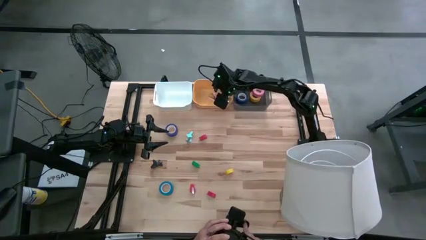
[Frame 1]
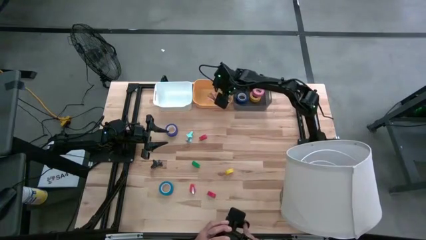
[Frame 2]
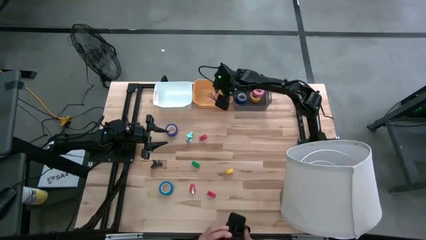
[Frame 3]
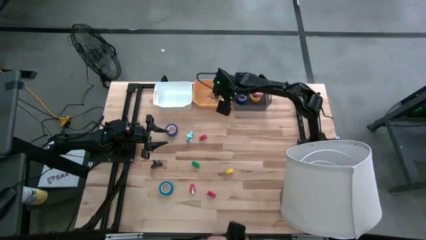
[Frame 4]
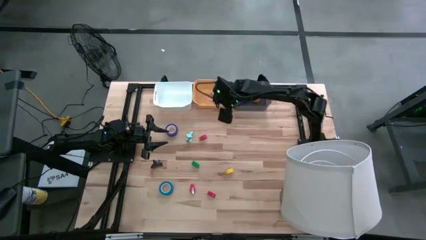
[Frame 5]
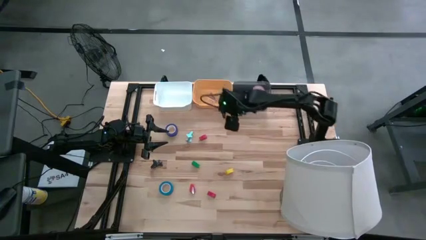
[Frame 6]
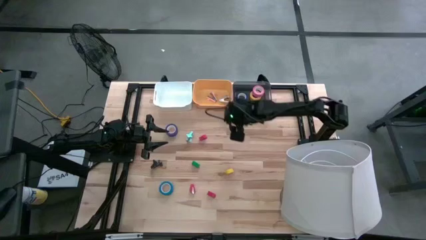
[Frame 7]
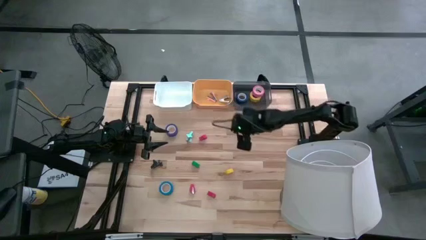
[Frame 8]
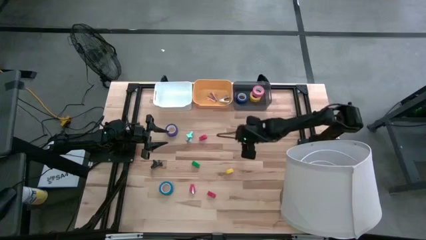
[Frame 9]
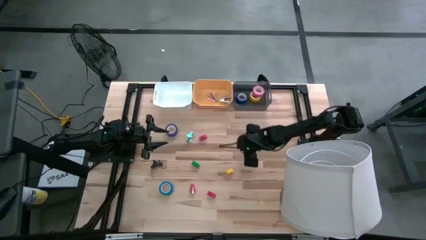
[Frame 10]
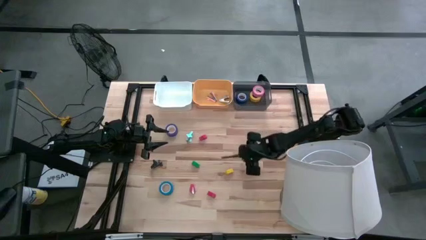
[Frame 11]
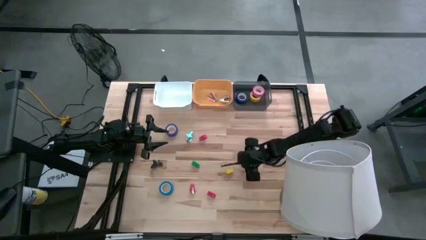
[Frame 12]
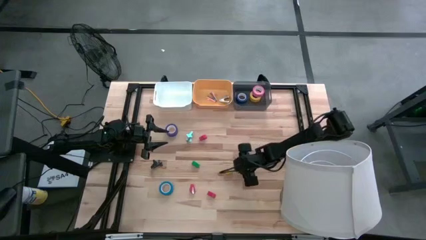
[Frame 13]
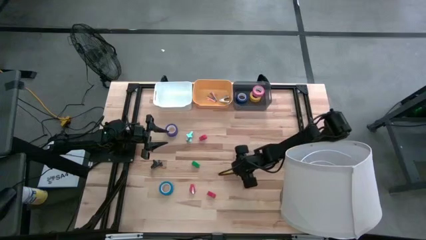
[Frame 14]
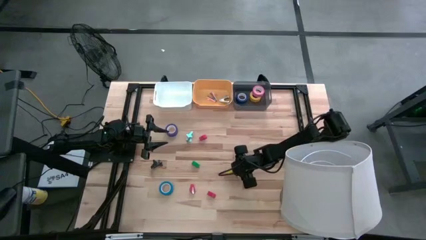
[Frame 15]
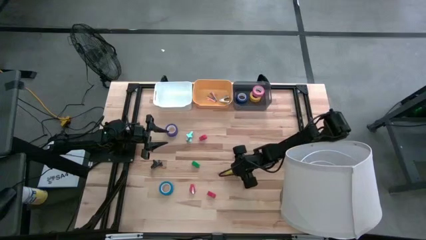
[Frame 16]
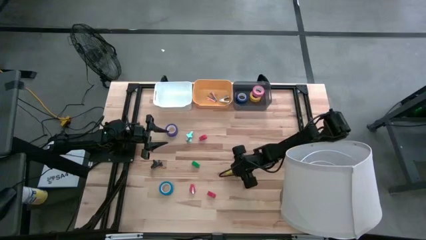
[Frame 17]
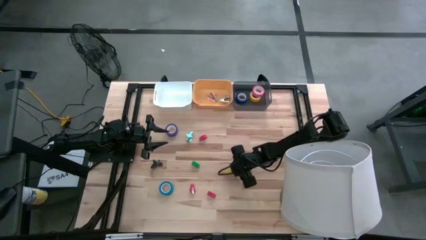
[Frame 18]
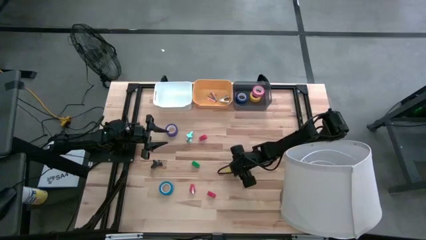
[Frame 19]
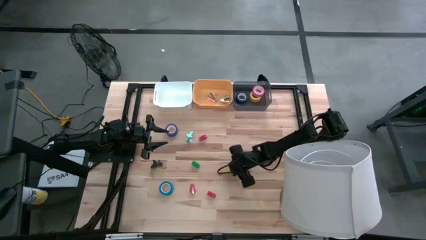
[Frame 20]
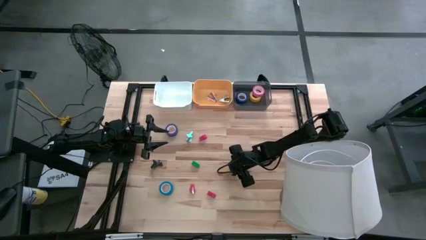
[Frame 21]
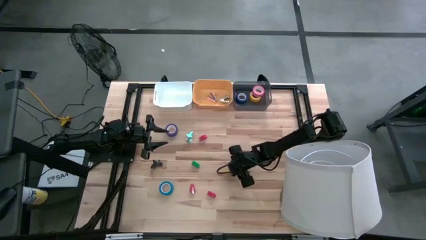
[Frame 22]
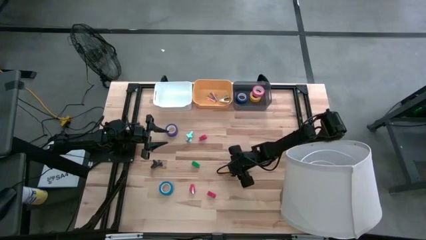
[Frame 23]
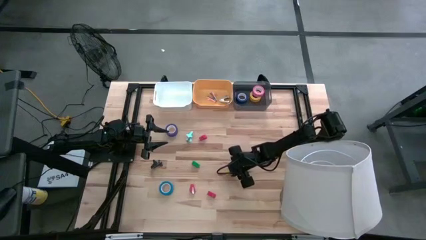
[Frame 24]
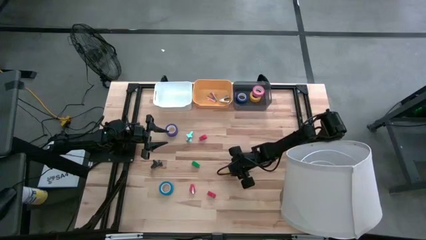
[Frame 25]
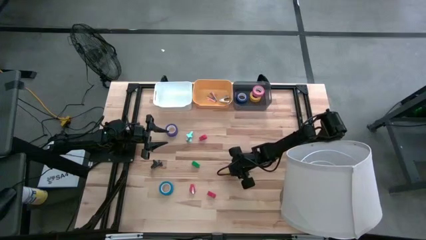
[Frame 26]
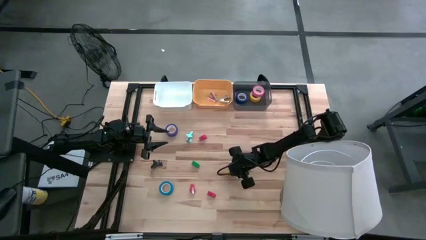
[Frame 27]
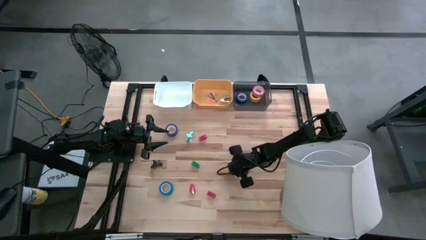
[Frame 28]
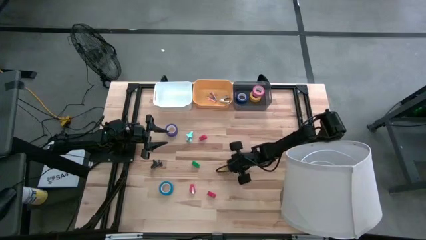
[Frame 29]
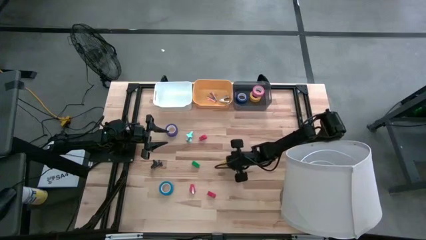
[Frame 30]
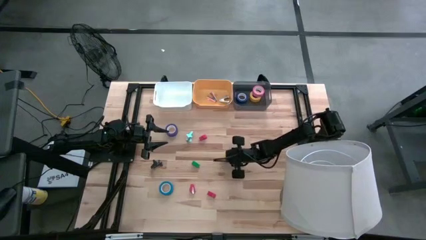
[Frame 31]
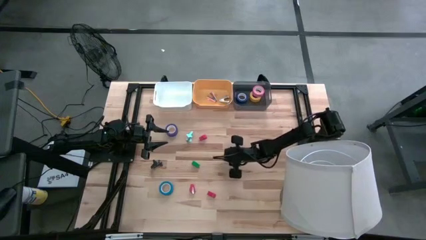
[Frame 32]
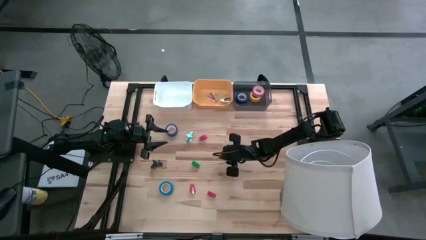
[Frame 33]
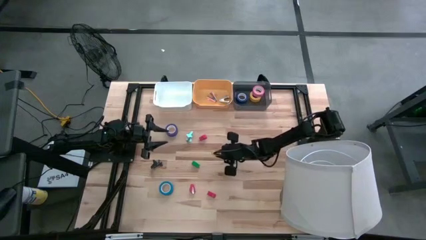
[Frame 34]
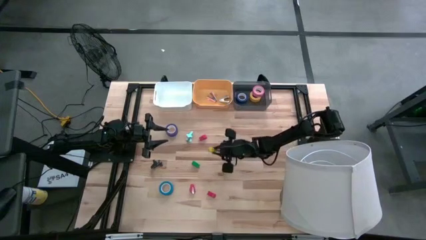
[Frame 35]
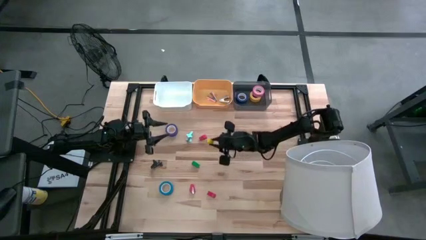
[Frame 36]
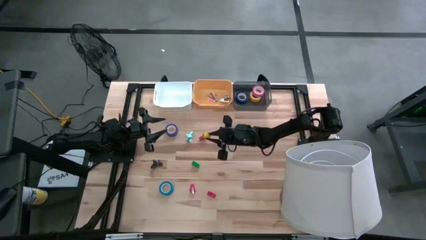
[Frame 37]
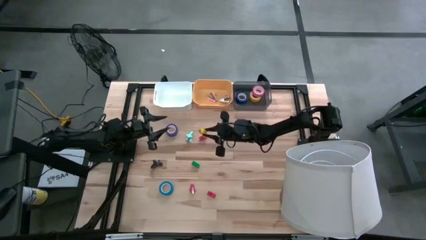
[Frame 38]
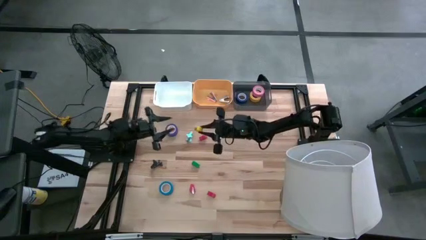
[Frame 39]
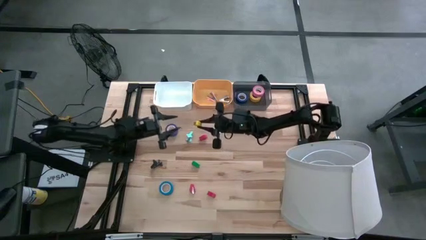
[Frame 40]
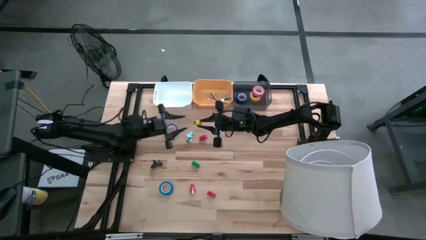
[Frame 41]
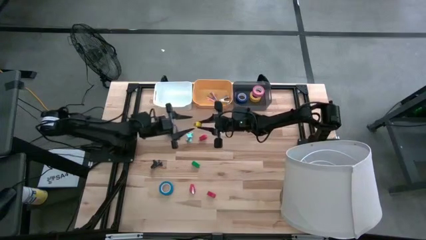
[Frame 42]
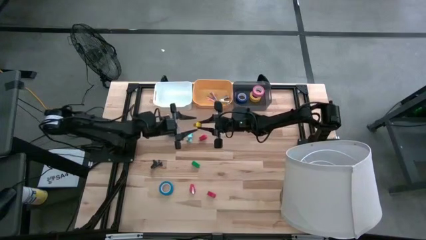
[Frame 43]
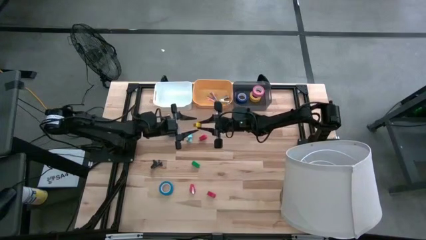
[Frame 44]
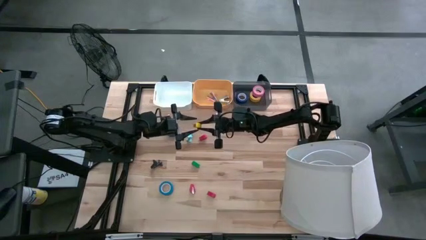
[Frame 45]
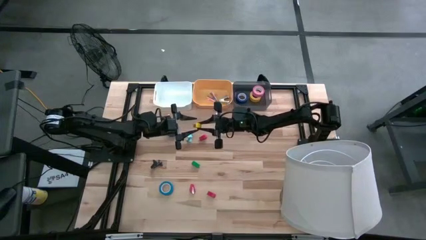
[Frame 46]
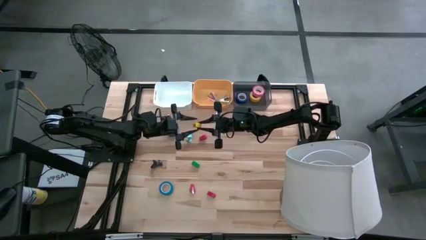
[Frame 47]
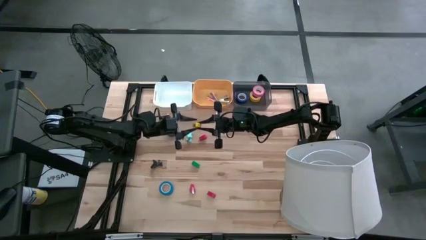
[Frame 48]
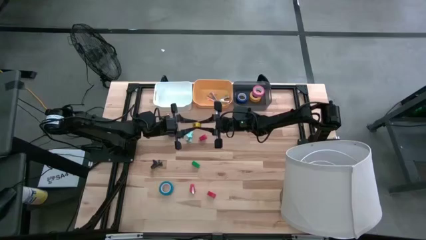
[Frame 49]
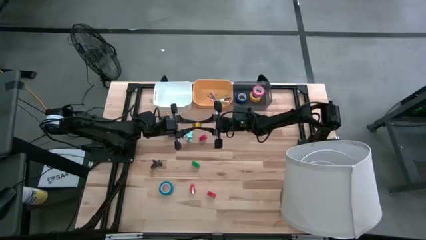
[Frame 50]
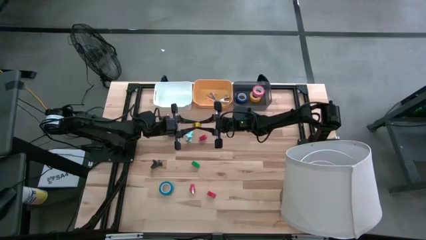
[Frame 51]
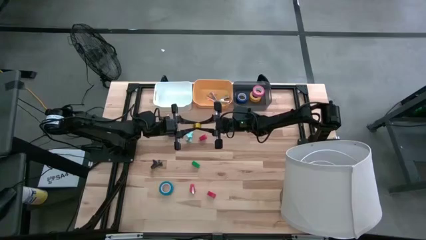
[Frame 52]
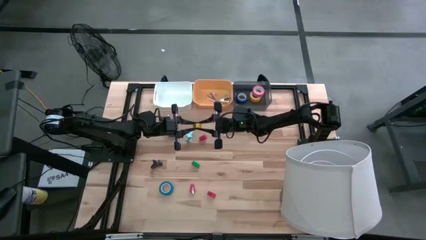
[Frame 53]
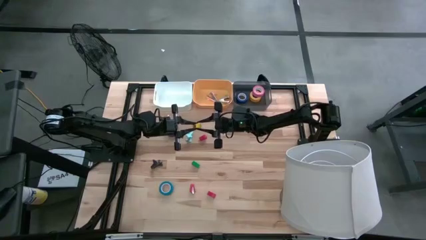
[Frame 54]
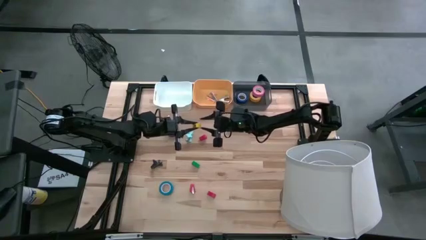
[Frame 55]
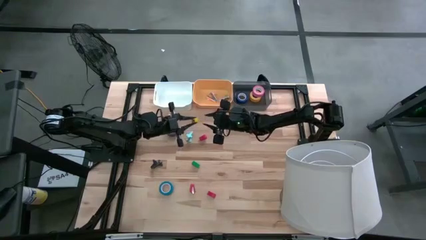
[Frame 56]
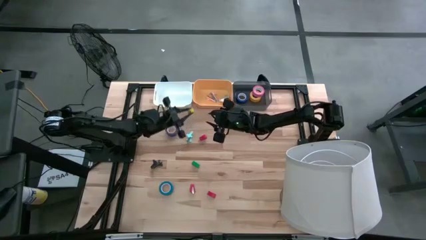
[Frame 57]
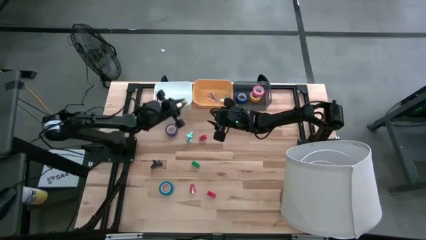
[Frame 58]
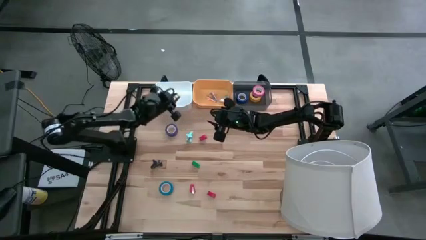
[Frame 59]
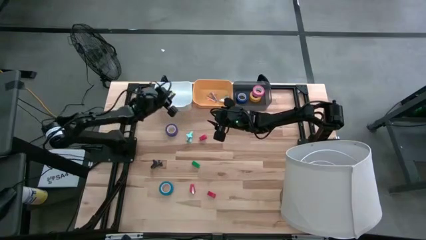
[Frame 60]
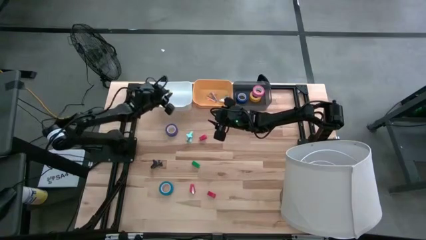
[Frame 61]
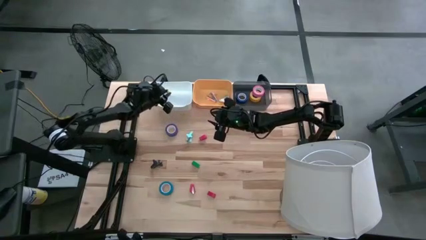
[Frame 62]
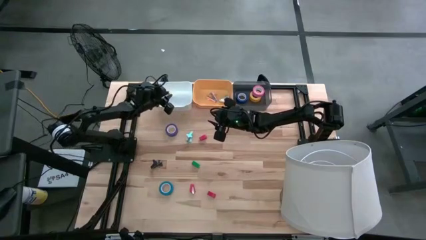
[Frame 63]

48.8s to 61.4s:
Task: Pick and place Stapler, Stapler remover, tape
Put the yellow stapler into the white bin
